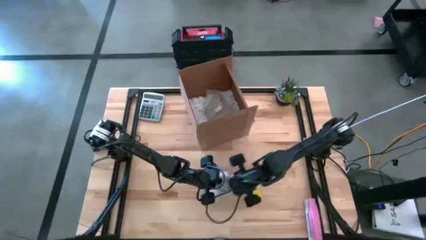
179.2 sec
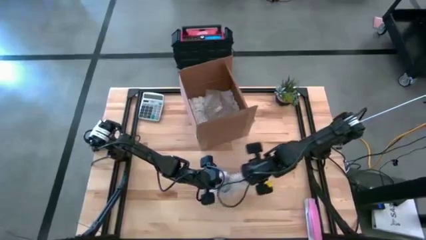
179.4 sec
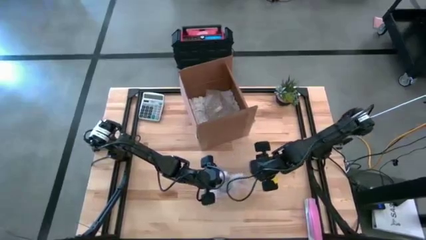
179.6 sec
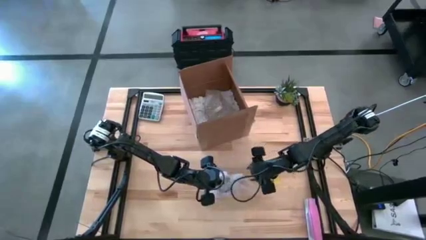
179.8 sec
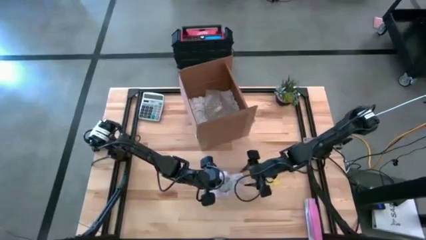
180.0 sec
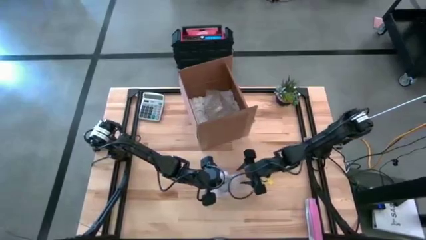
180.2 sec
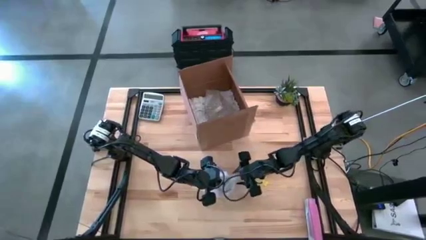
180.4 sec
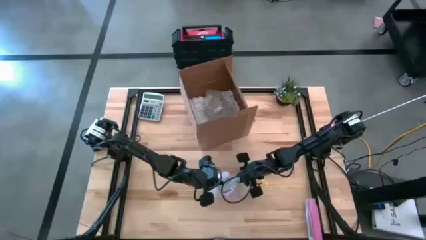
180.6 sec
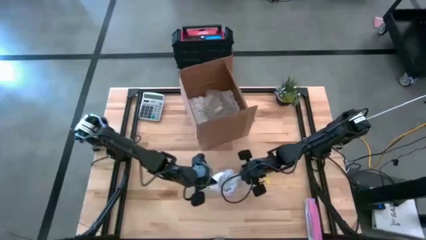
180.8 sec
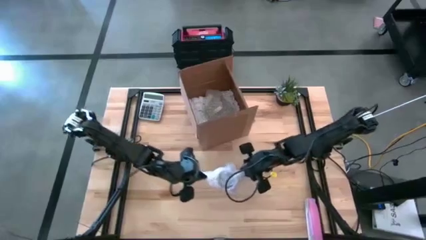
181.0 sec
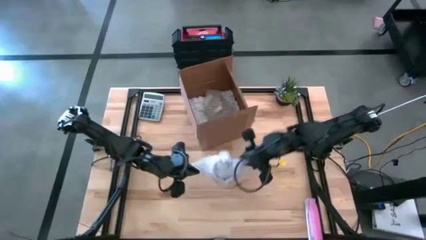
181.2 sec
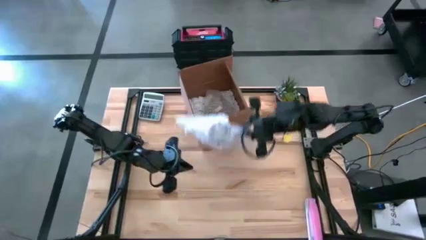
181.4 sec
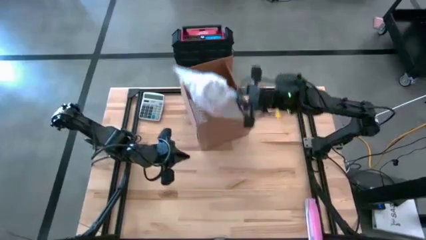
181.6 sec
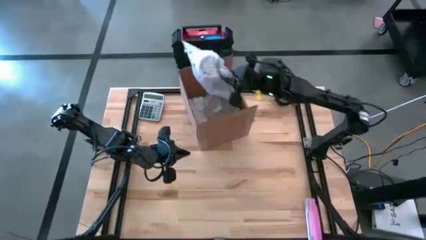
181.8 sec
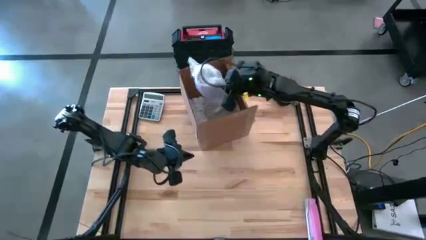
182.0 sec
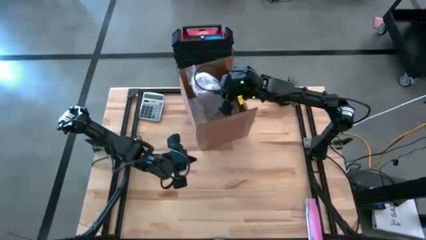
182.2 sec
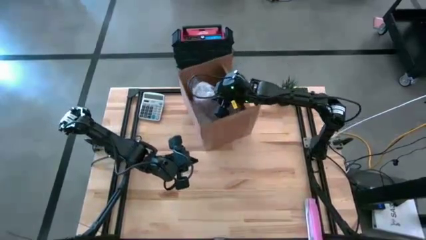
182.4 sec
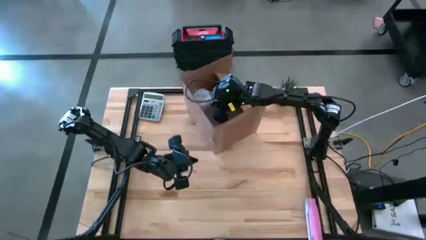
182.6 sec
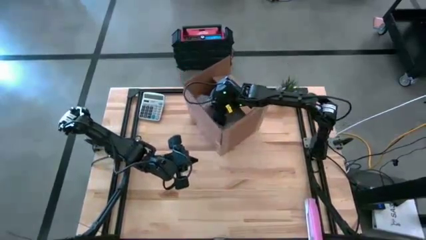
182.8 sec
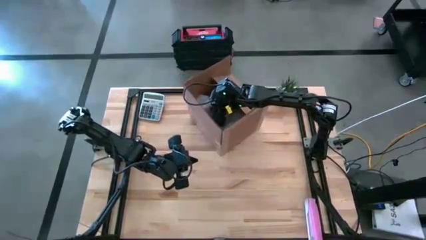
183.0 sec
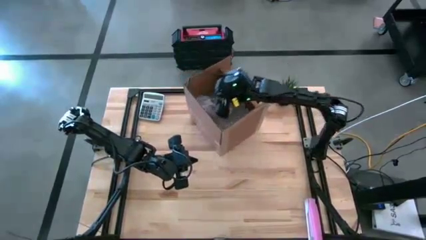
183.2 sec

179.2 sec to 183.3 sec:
Task: wrap mug
Put the wrapped purple mug into the cardboard box

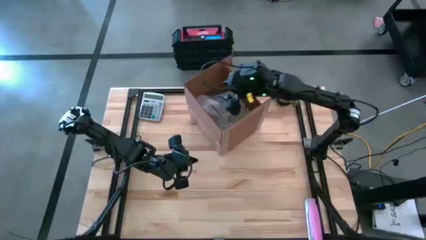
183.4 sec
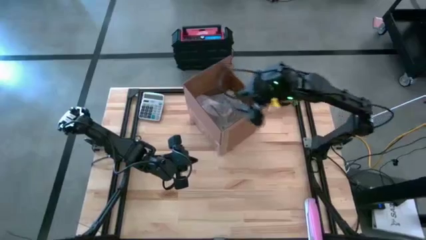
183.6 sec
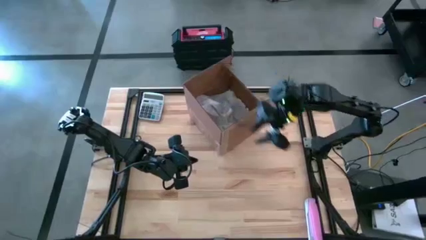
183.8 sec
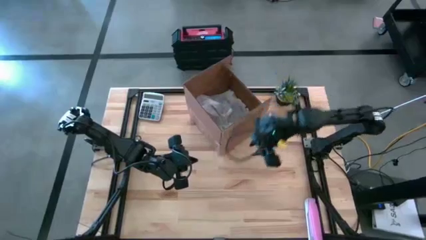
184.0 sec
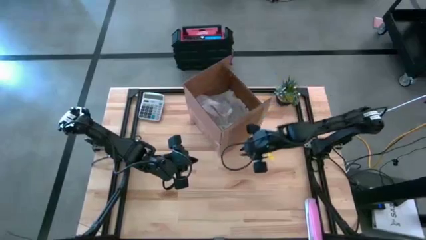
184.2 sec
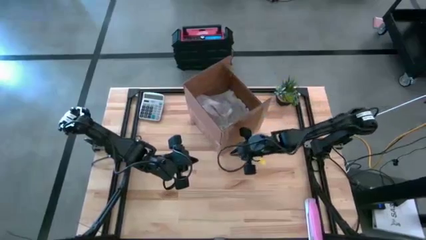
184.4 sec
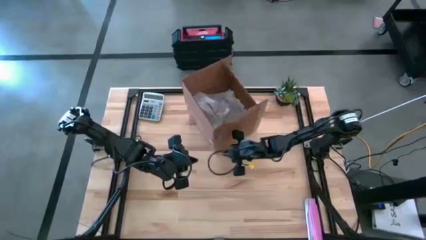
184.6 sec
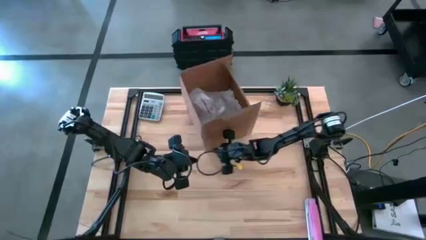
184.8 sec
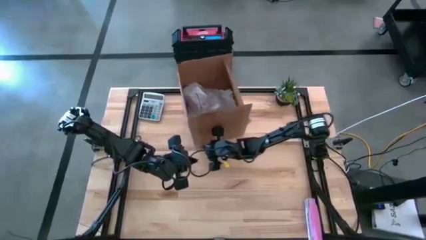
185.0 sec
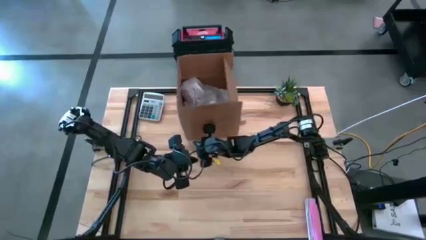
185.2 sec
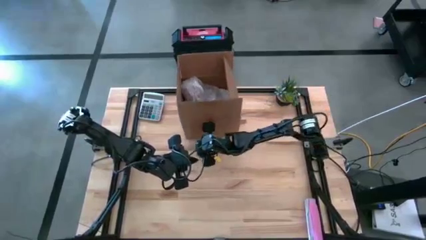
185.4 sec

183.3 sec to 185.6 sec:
Adjust the cardboard box on the table

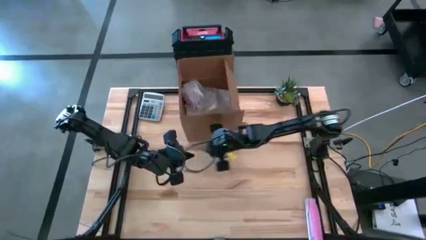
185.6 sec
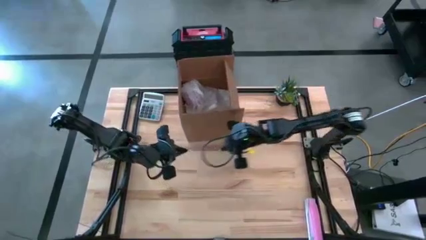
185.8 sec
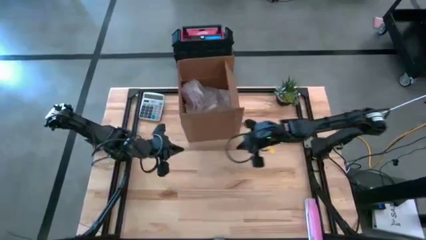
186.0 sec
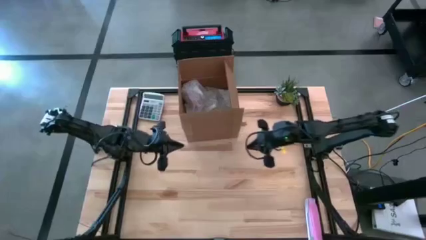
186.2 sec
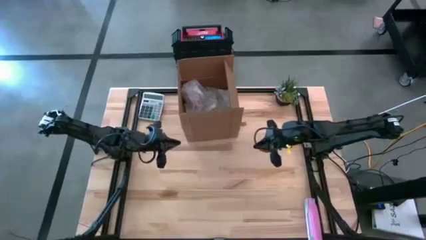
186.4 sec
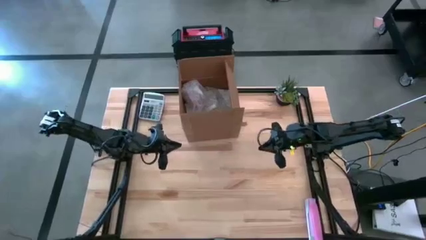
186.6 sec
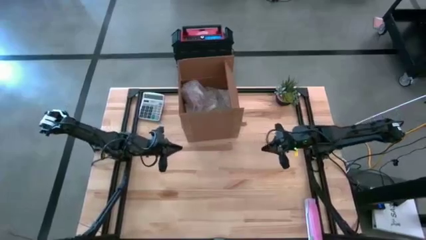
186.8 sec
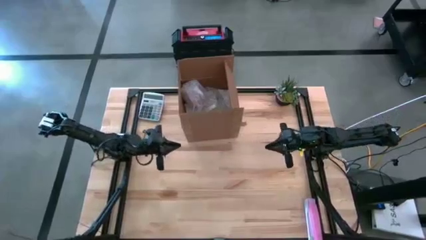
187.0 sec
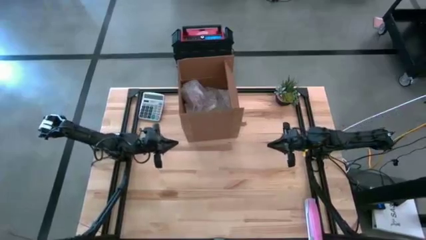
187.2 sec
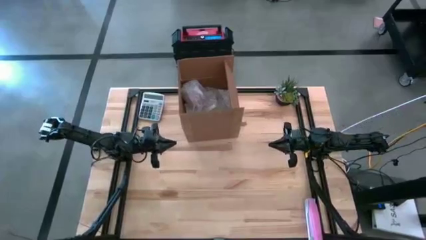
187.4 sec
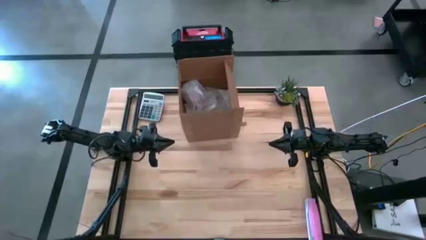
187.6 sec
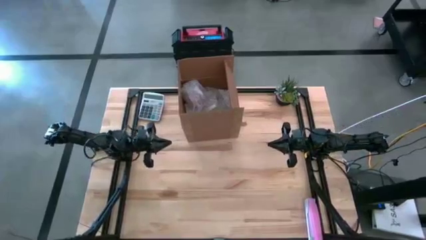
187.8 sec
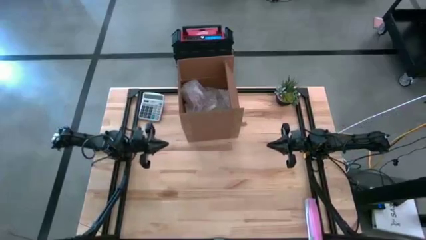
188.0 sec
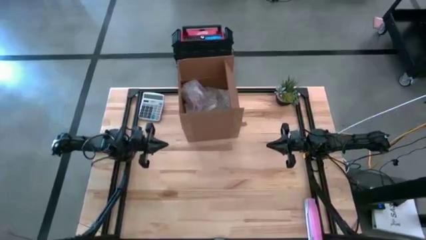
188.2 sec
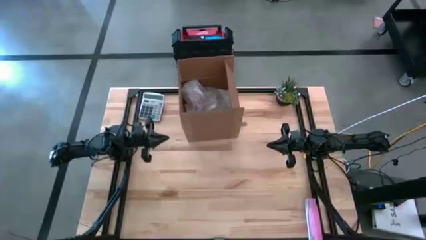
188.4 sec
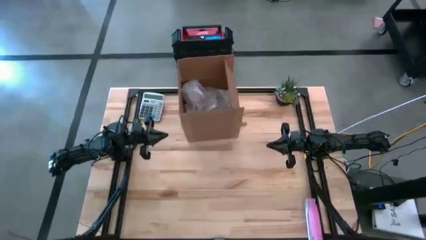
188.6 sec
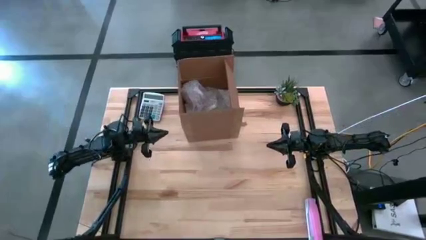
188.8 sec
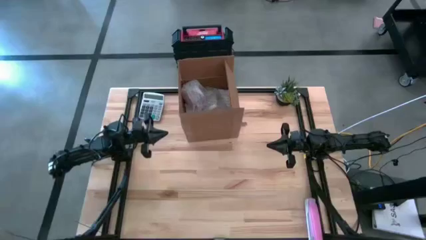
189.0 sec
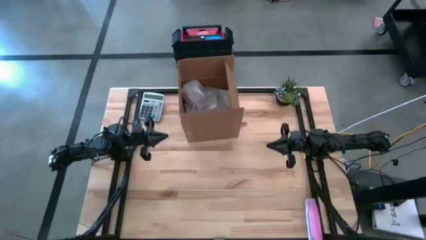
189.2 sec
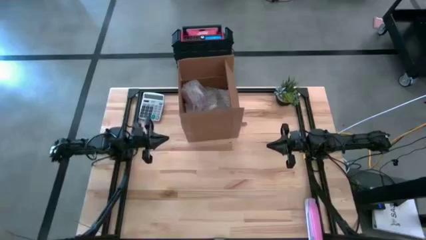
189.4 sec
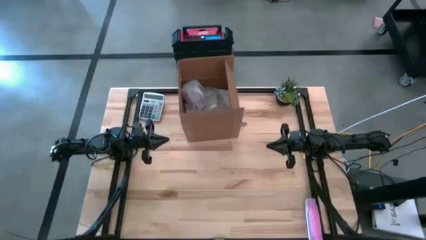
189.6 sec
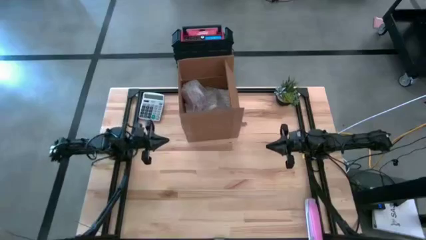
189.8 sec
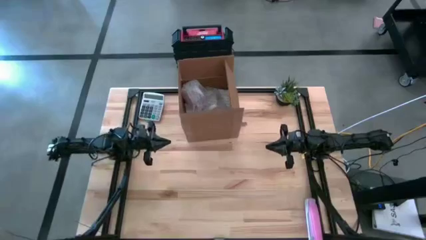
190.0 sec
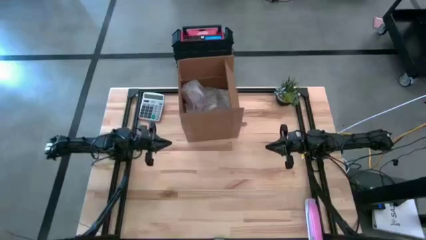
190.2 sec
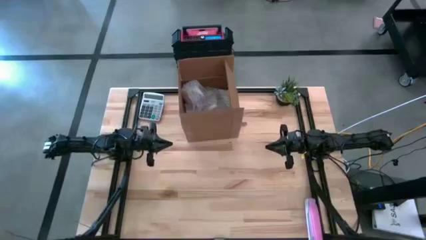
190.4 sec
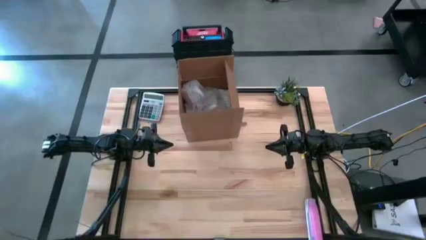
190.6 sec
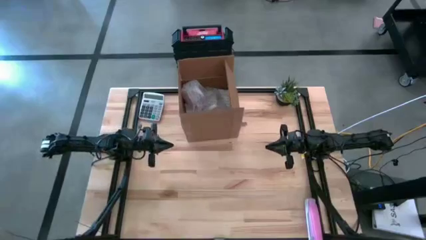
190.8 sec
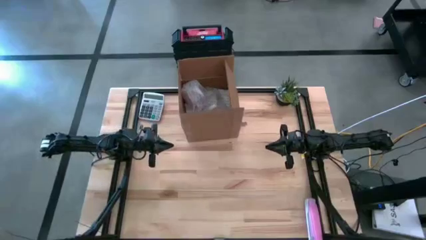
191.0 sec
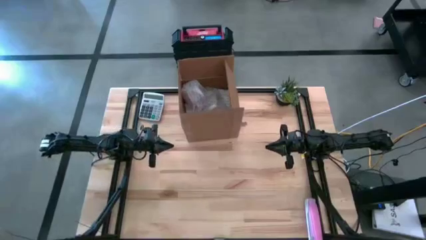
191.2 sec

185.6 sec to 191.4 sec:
Return to Home Position

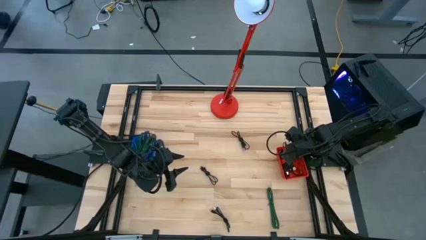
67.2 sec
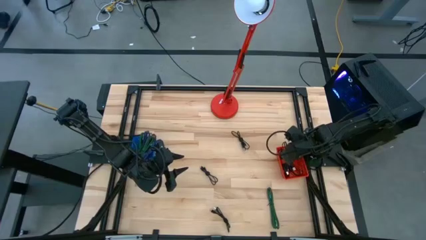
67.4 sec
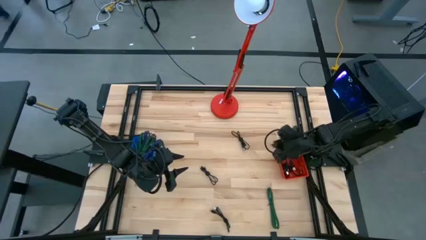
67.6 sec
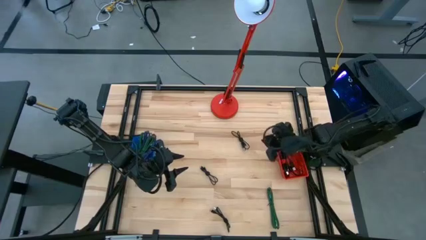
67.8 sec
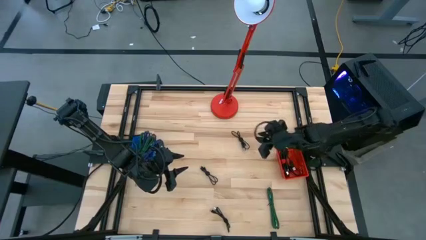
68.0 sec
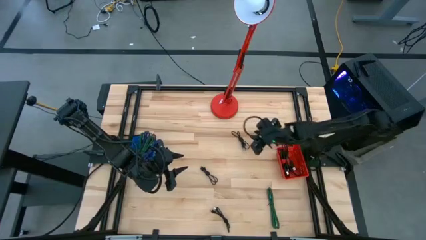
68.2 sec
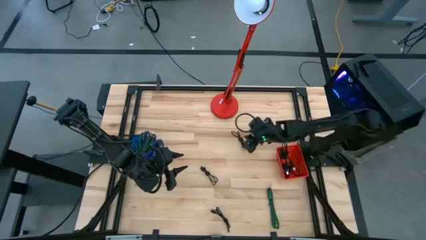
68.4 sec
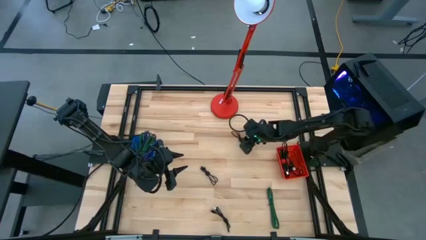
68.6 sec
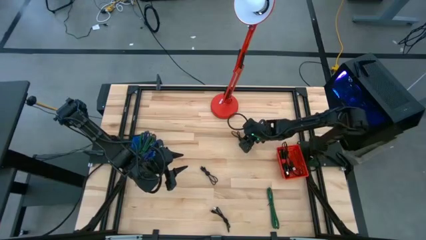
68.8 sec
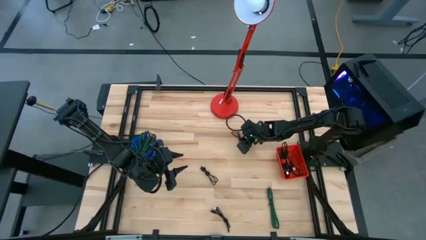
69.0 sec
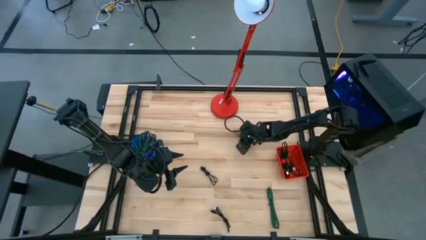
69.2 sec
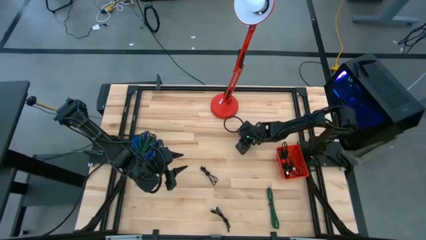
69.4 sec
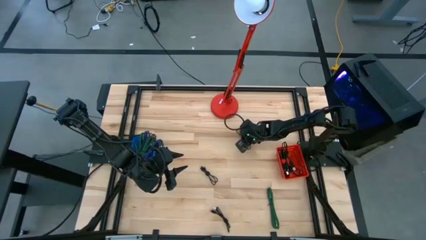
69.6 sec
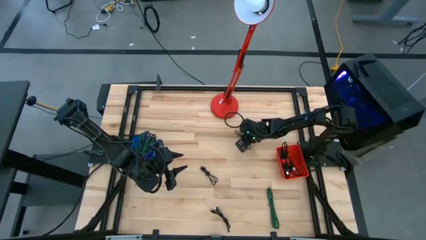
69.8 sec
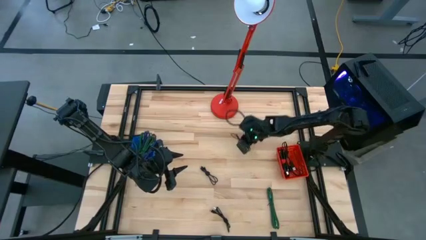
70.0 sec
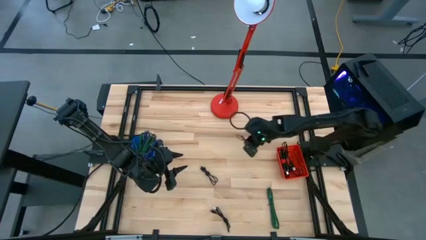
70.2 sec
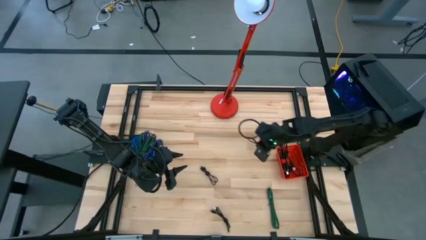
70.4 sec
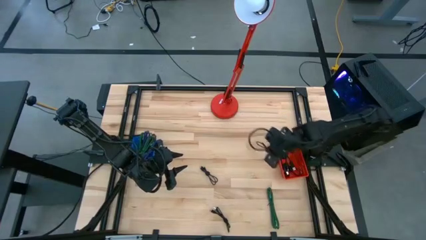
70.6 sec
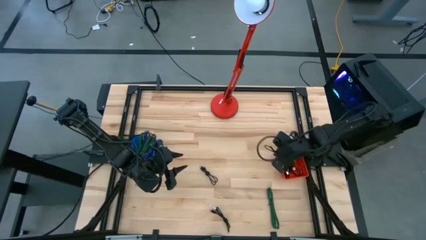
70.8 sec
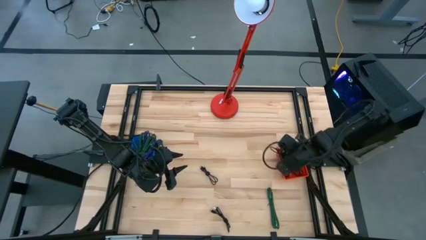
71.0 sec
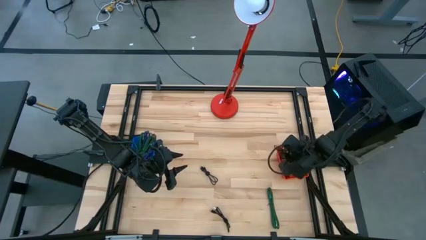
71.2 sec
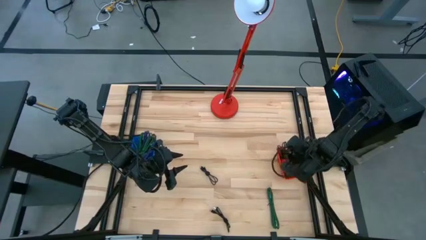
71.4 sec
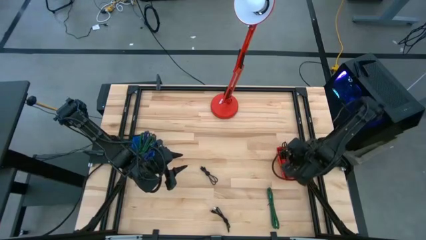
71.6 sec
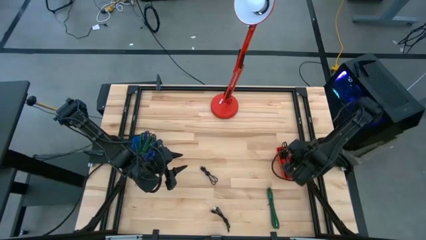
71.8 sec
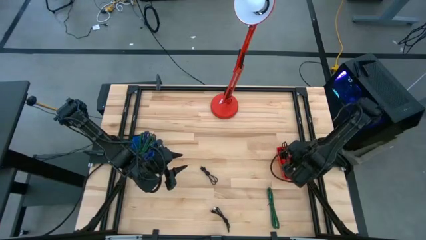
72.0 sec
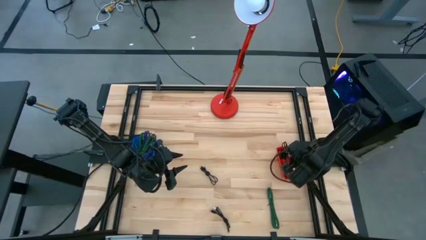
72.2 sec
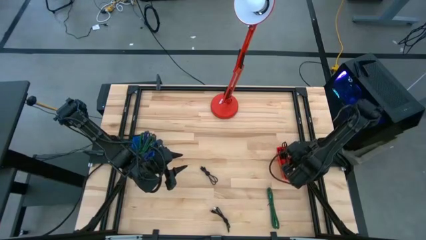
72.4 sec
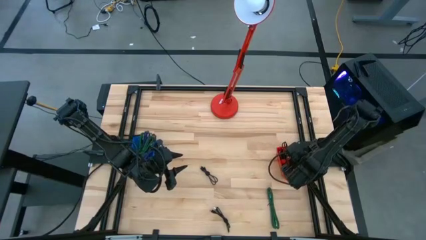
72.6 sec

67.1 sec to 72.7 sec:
Task: Pick & Place USB Port
Put the black charger cable into the red bin
